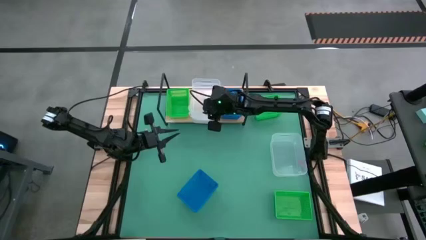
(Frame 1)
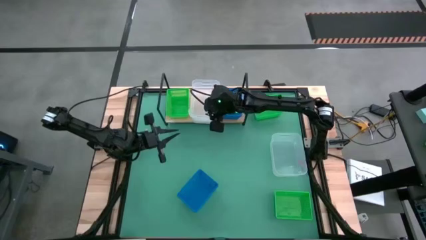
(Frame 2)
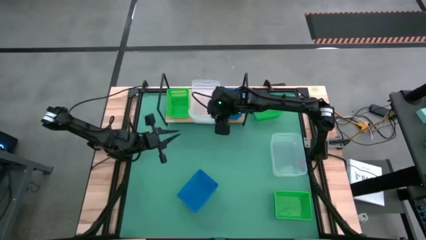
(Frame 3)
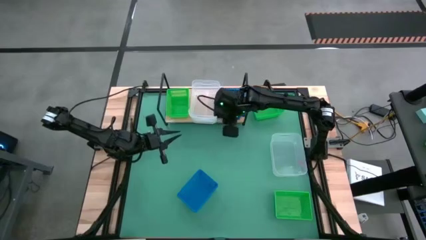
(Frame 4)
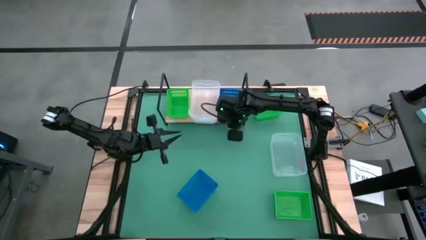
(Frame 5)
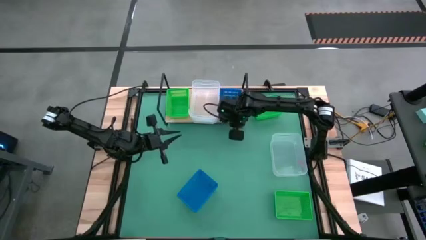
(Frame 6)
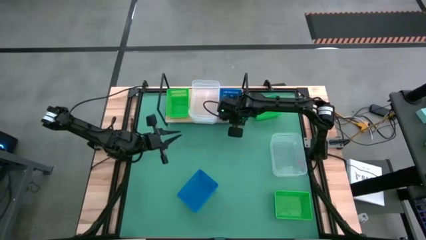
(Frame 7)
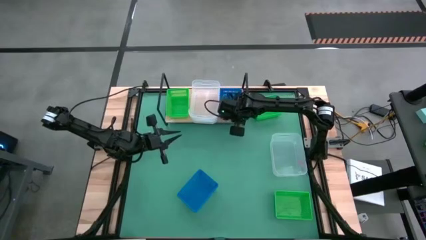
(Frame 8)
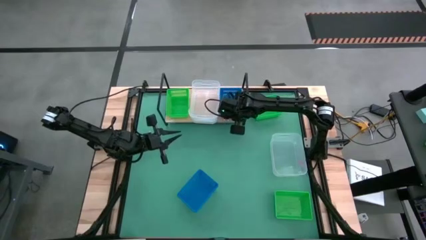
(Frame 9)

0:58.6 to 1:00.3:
Task: Stack baskets on shelf by color
Adjust the blue bin on the shelf

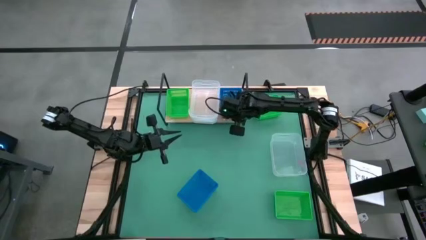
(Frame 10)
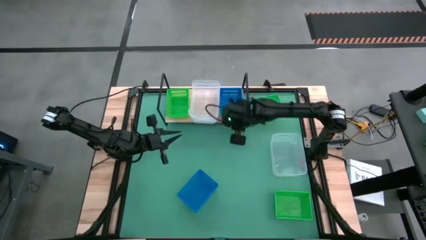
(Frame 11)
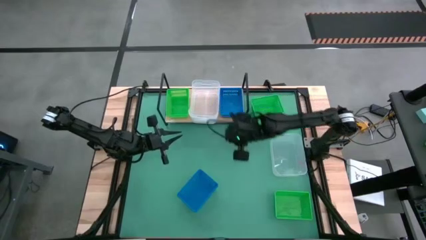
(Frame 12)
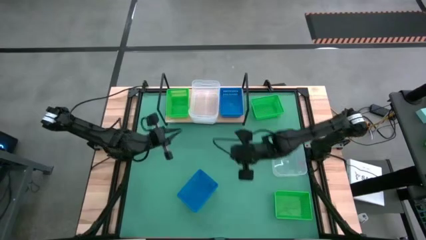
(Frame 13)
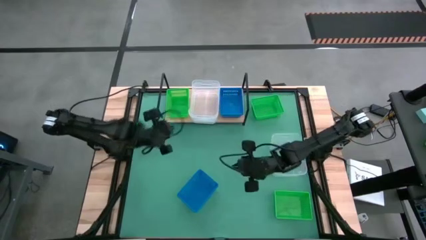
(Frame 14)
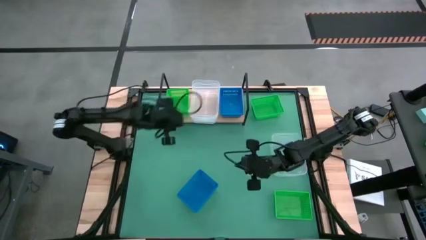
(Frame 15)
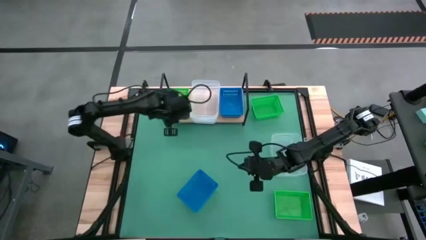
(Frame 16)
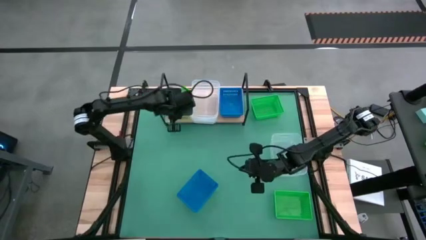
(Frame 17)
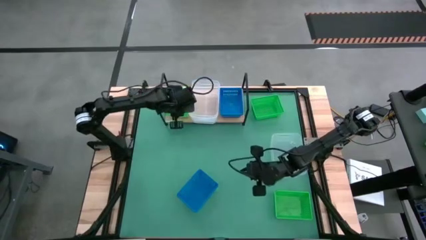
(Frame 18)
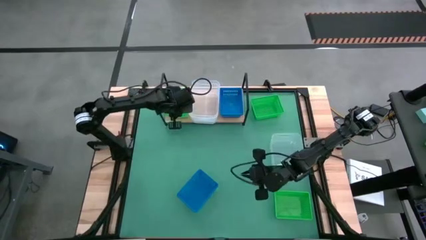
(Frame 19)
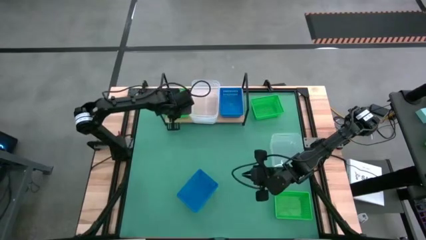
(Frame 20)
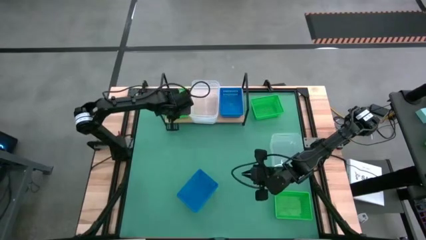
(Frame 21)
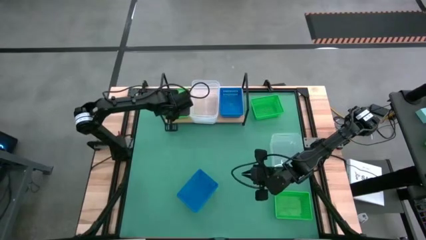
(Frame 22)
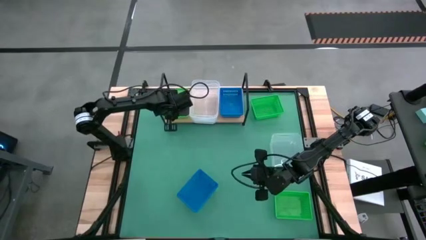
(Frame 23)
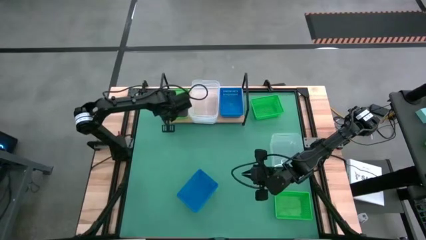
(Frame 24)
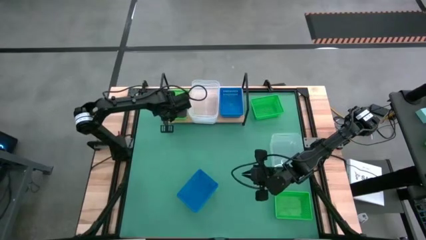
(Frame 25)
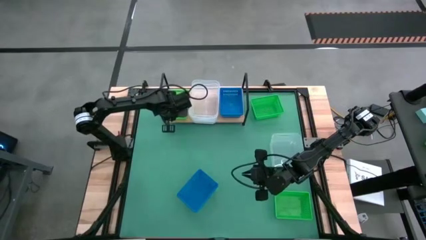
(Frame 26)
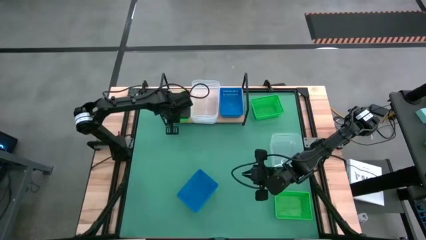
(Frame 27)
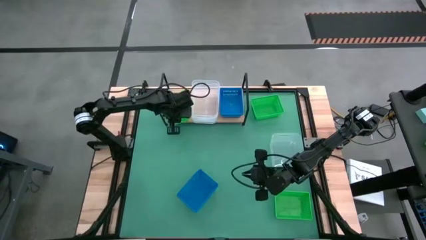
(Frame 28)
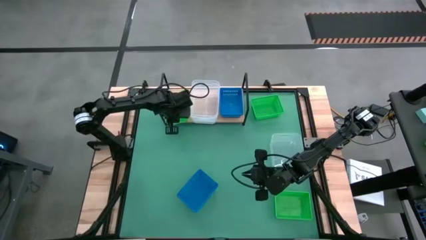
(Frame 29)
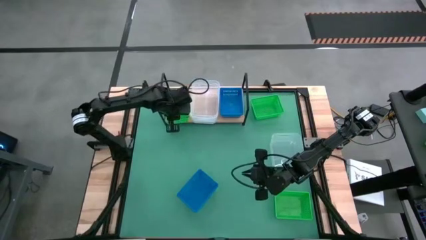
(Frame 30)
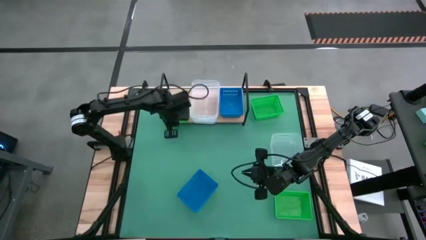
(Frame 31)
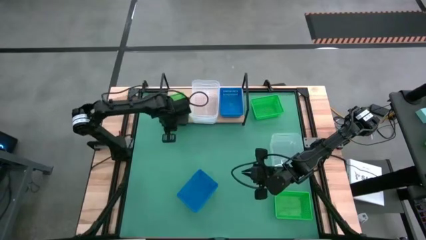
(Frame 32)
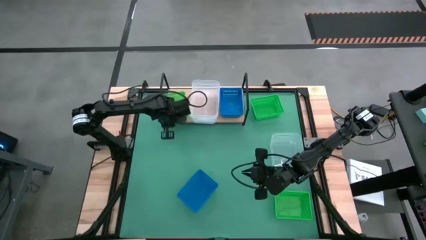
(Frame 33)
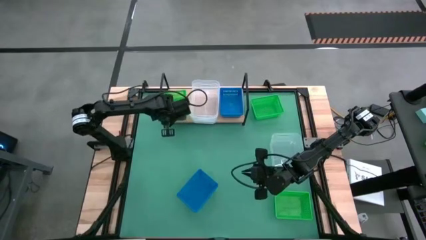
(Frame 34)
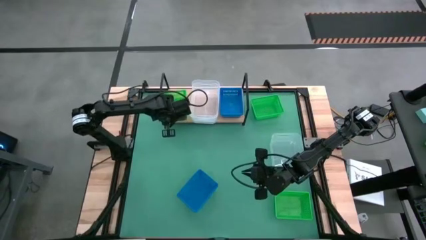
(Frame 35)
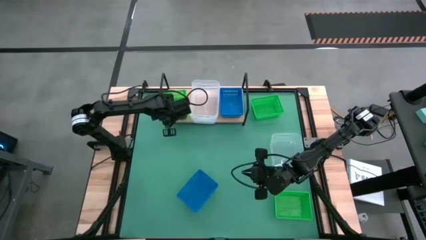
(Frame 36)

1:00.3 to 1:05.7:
Adjust the green bin on the shelf

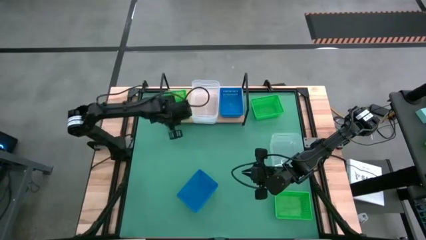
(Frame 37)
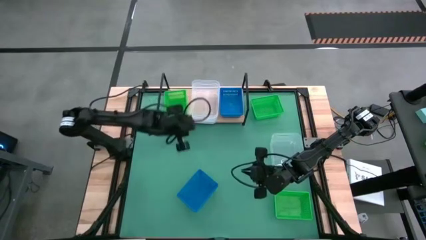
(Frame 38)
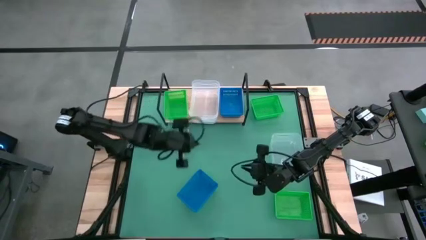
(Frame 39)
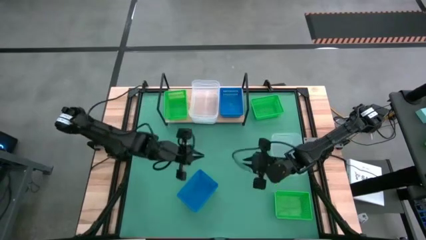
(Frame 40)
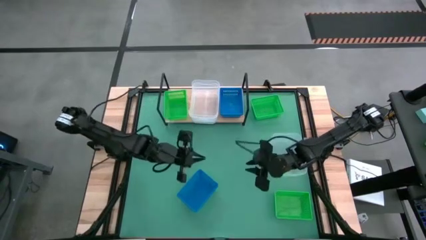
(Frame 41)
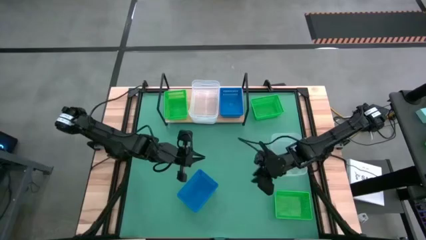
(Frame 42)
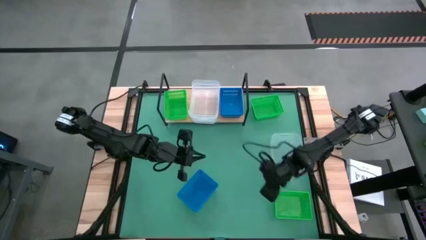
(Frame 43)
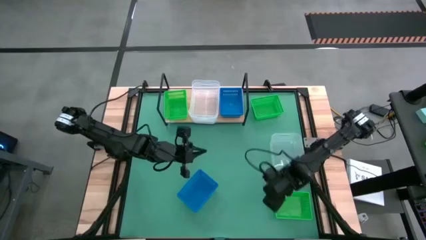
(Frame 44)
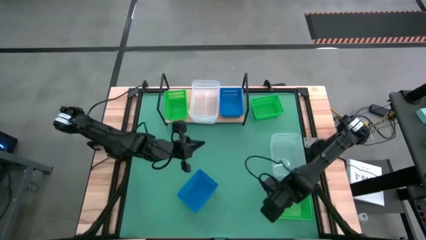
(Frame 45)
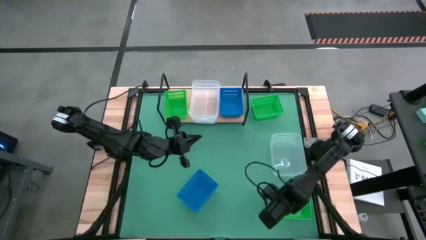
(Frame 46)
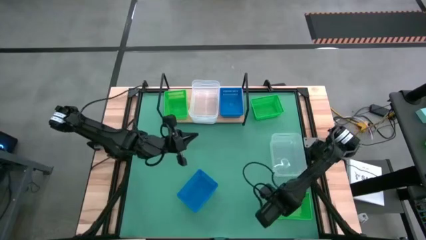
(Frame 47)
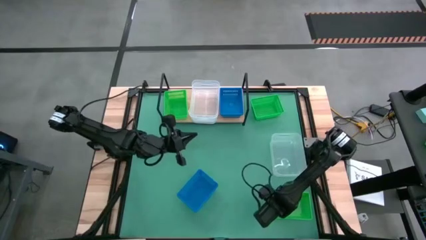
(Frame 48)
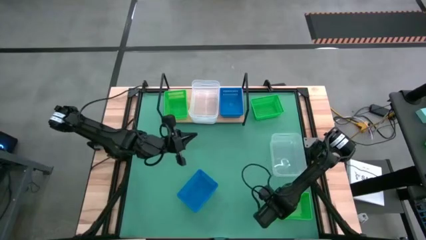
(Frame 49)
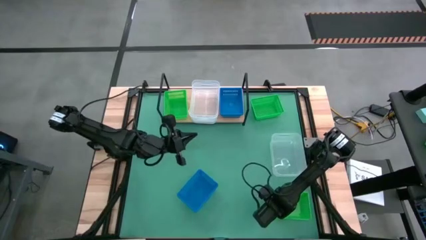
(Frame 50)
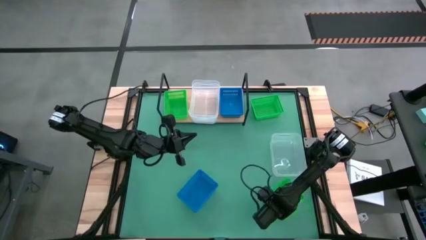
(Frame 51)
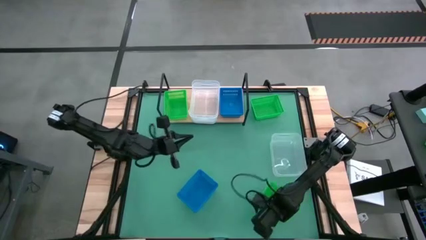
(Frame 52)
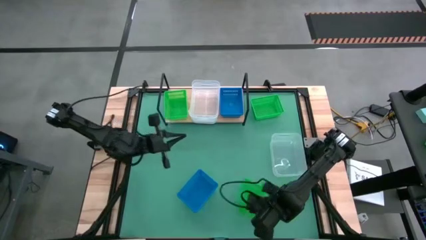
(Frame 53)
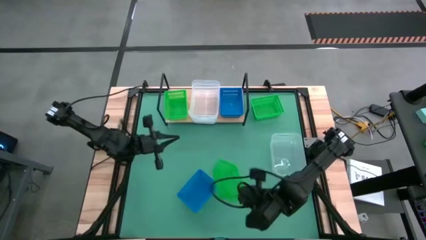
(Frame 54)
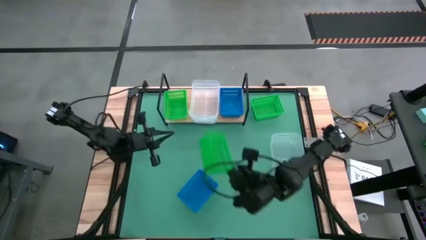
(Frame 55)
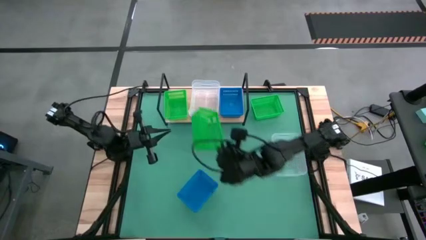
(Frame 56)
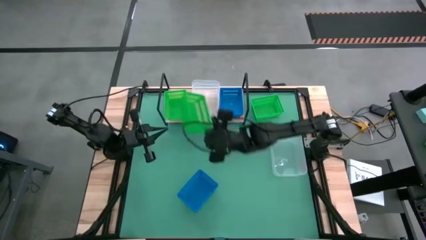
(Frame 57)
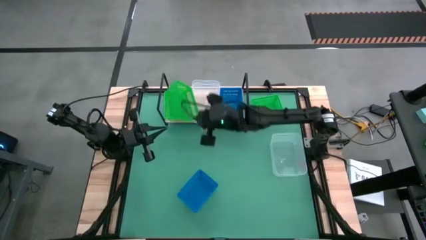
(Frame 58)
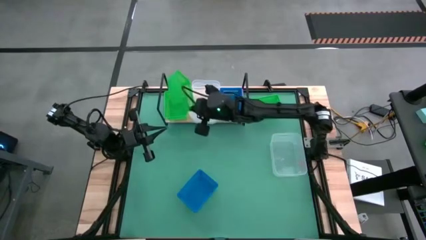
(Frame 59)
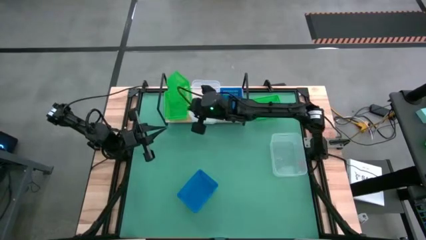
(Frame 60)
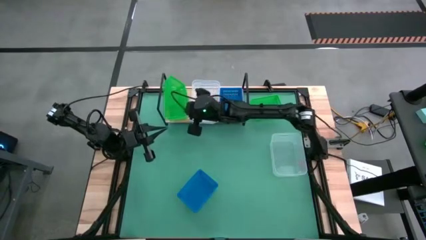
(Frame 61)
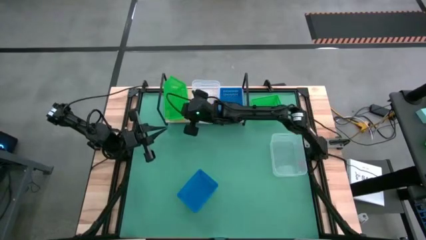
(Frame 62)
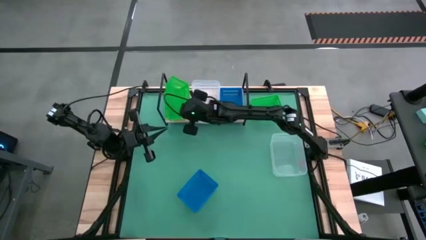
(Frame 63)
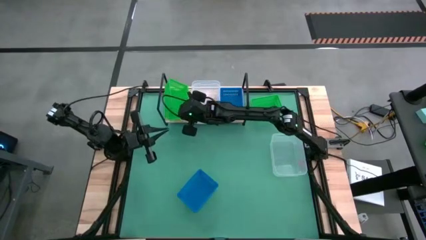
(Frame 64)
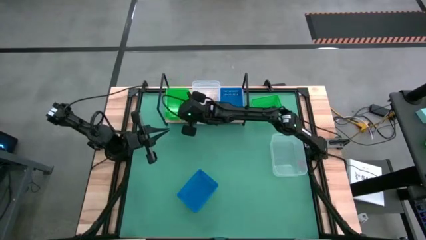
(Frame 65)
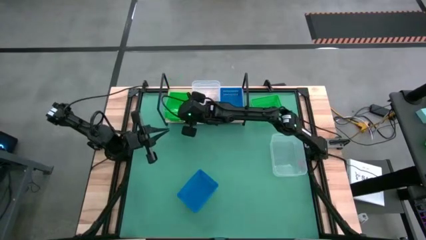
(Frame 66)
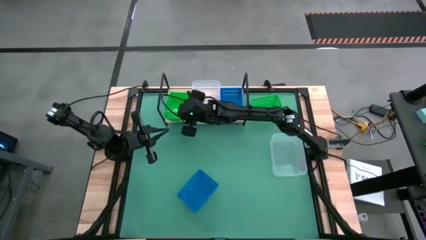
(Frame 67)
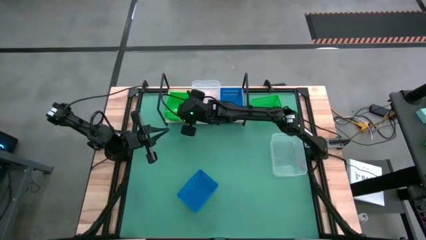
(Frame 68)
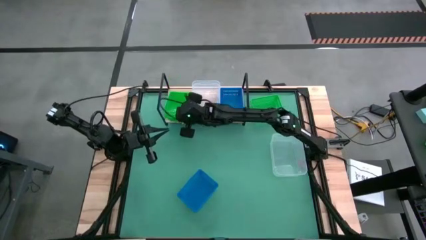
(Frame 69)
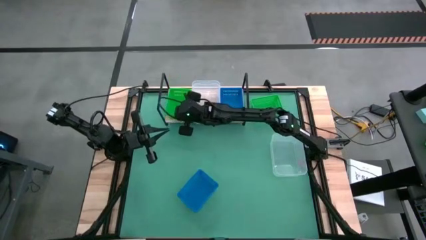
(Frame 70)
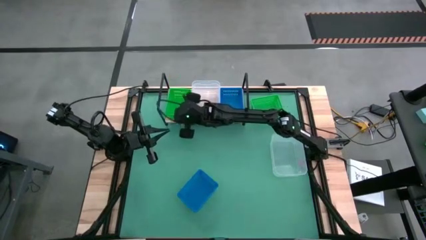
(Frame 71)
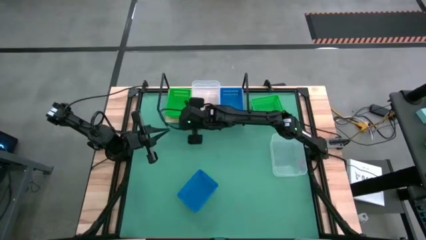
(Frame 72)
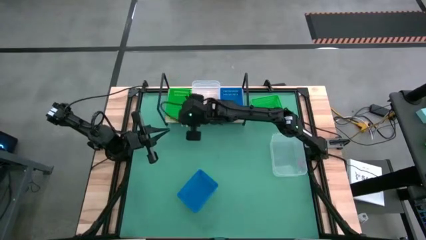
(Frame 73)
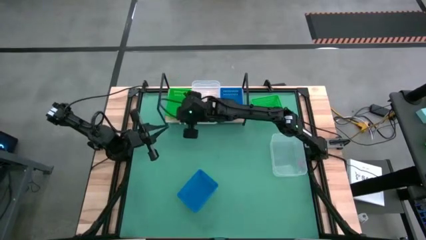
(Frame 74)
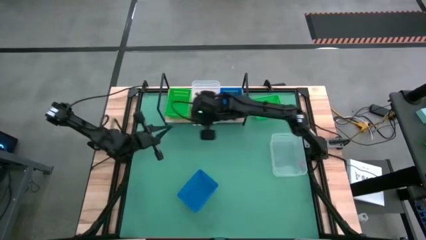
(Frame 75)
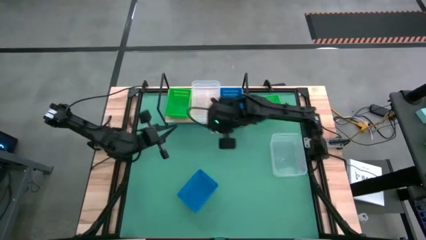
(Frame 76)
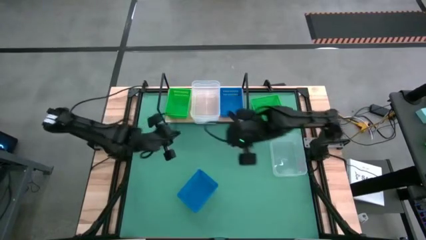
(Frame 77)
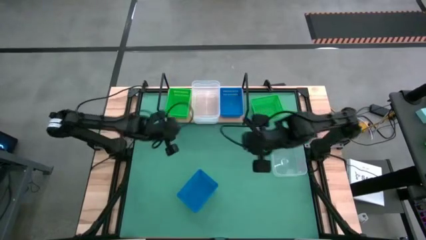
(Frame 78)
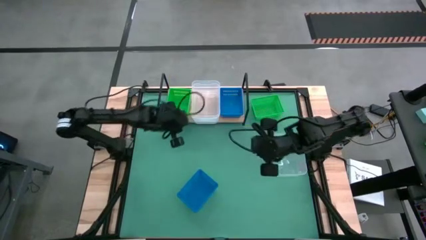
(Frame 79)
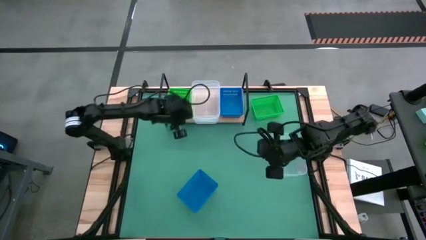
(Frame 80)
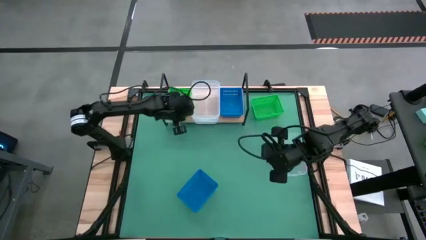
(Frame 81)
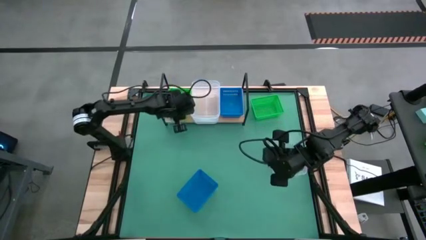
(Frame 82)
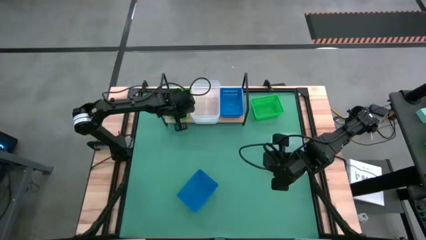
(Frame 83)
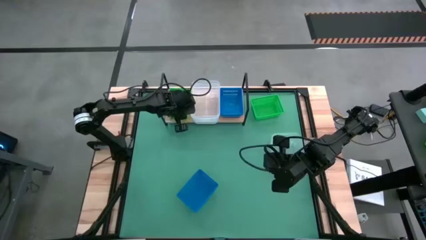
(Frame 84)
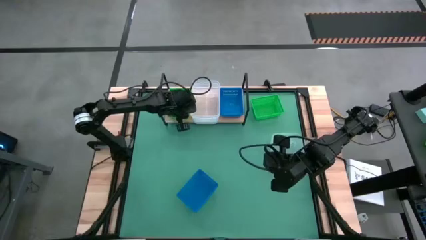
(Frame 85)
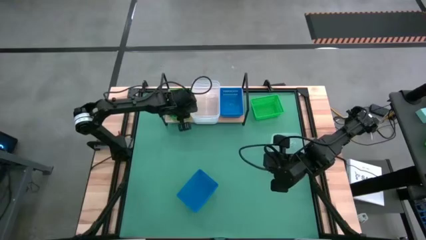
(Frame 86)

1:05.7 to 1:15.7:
Stack the bottom green bin on the green bin on the shelf
